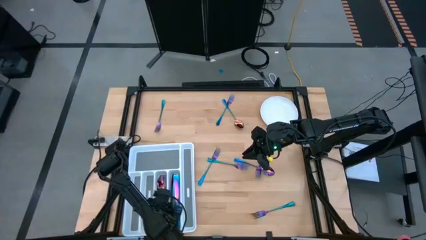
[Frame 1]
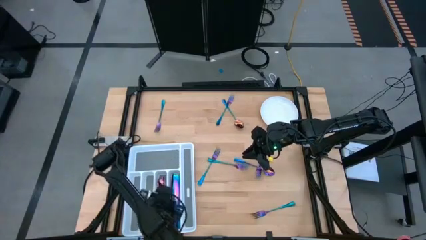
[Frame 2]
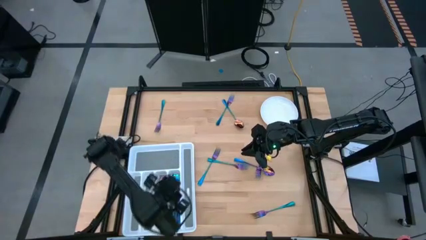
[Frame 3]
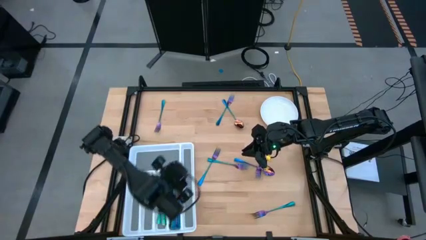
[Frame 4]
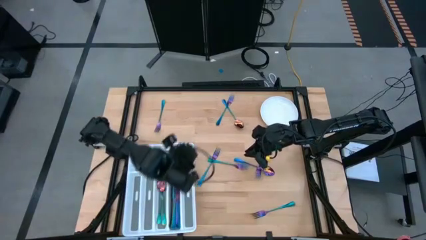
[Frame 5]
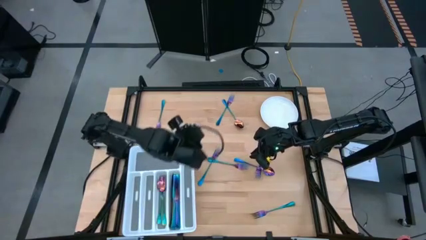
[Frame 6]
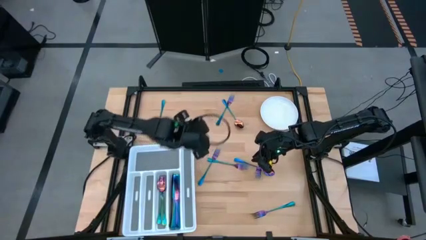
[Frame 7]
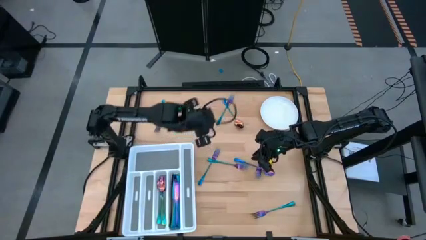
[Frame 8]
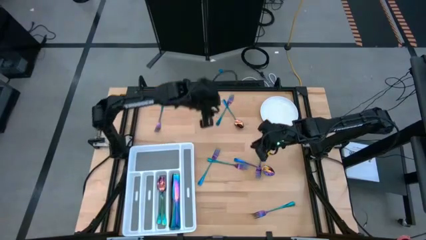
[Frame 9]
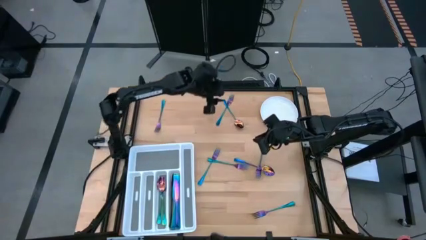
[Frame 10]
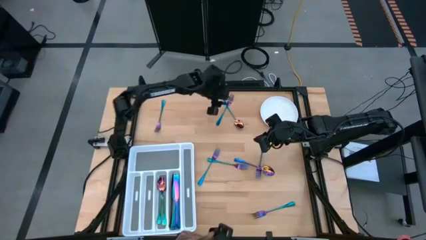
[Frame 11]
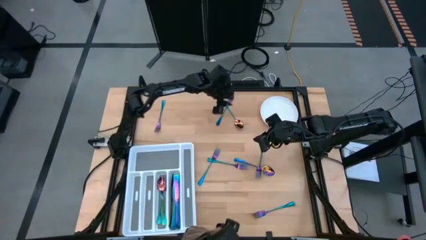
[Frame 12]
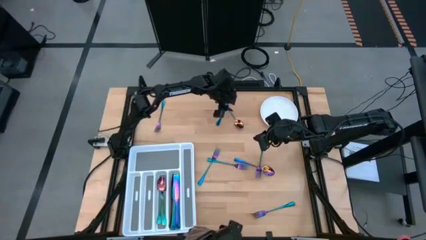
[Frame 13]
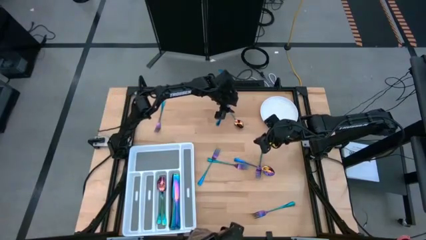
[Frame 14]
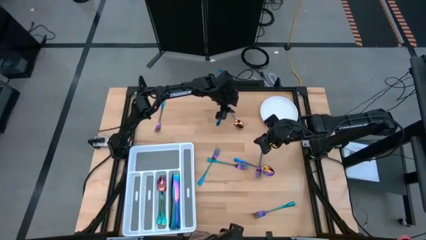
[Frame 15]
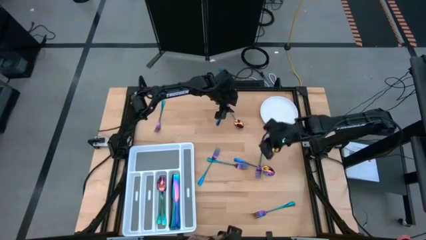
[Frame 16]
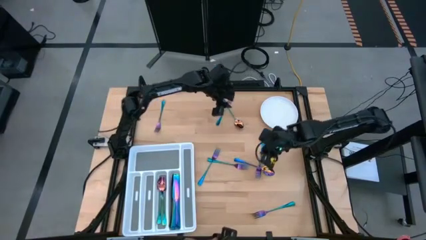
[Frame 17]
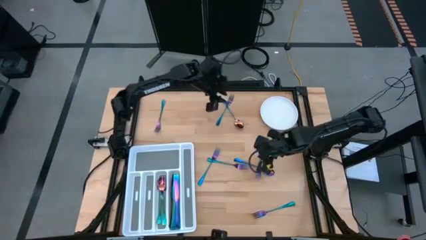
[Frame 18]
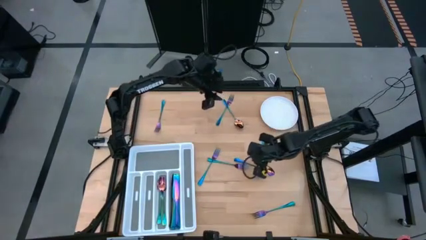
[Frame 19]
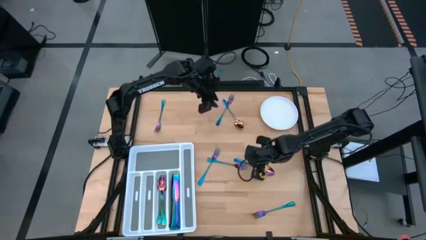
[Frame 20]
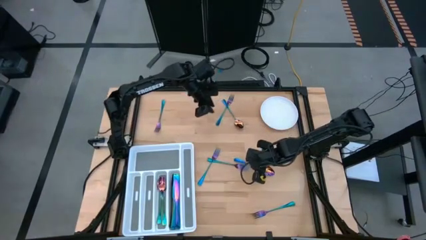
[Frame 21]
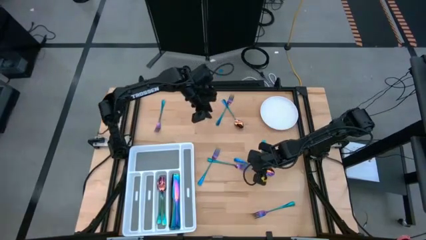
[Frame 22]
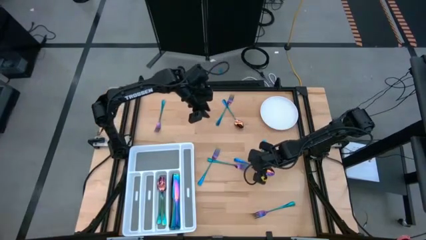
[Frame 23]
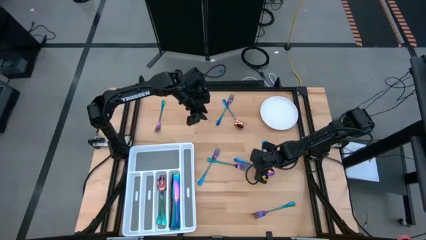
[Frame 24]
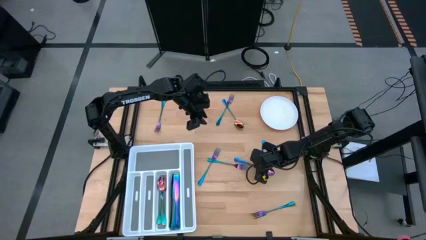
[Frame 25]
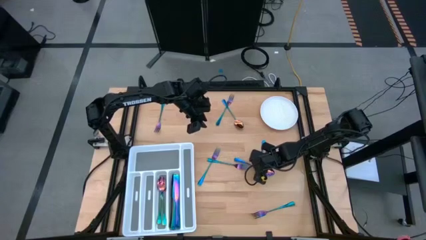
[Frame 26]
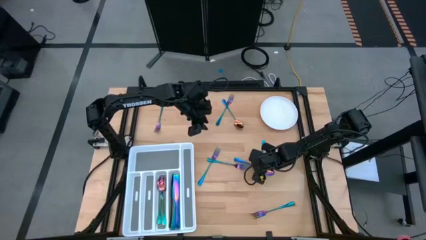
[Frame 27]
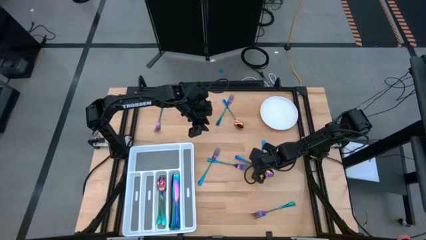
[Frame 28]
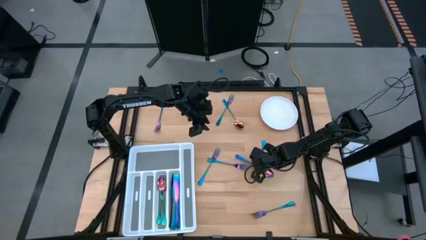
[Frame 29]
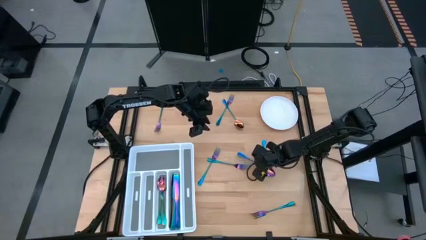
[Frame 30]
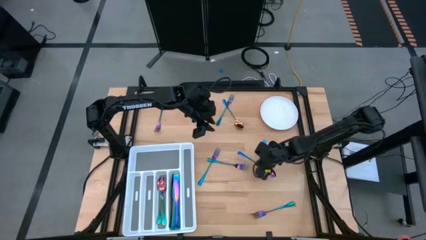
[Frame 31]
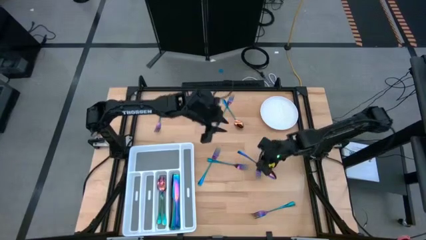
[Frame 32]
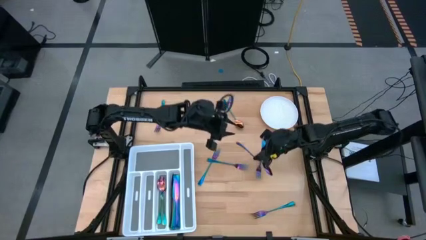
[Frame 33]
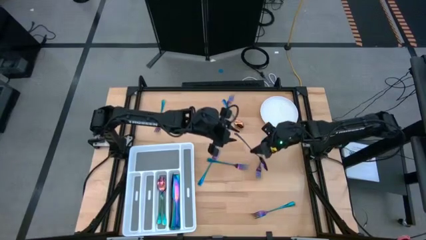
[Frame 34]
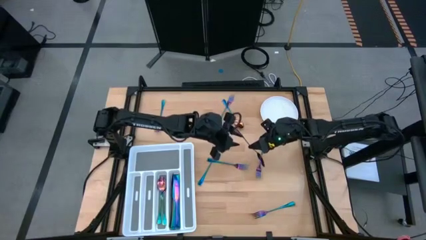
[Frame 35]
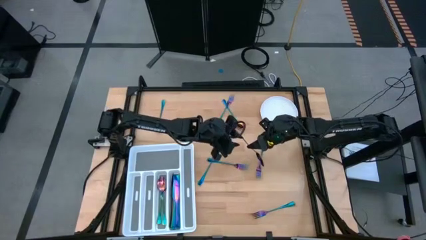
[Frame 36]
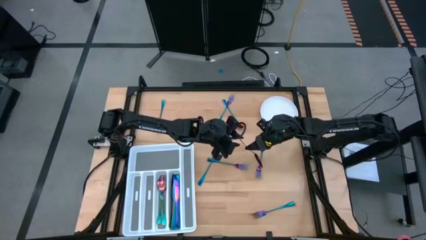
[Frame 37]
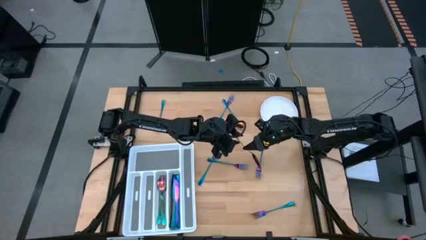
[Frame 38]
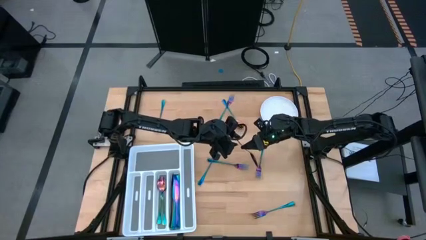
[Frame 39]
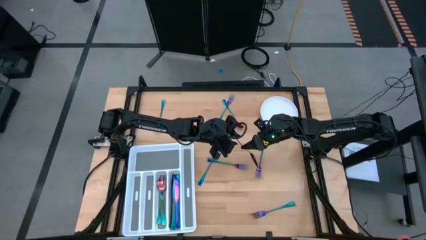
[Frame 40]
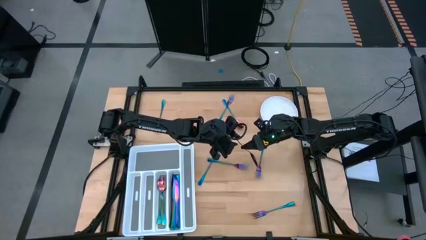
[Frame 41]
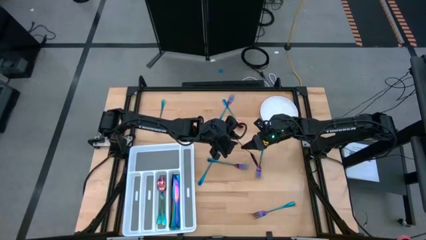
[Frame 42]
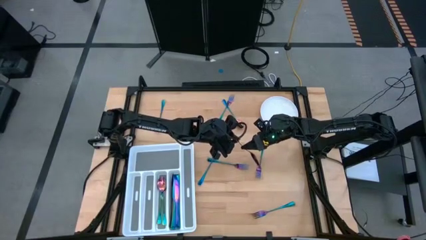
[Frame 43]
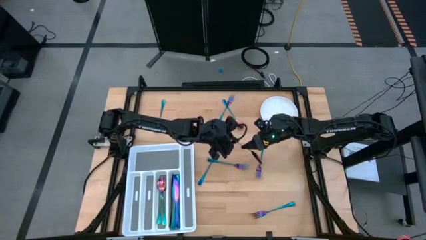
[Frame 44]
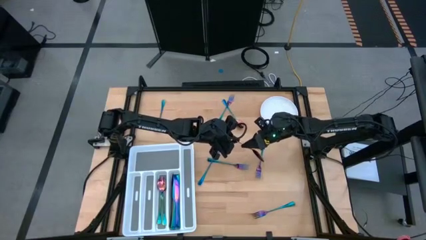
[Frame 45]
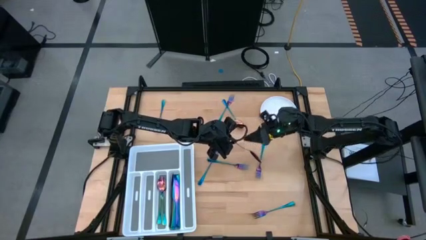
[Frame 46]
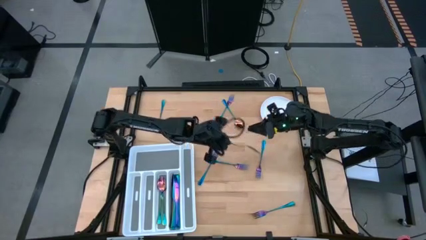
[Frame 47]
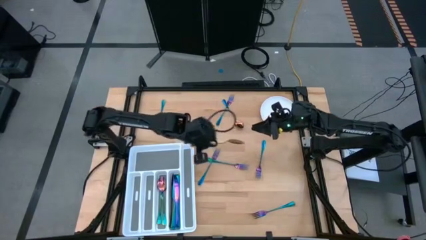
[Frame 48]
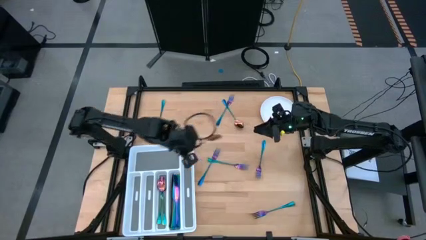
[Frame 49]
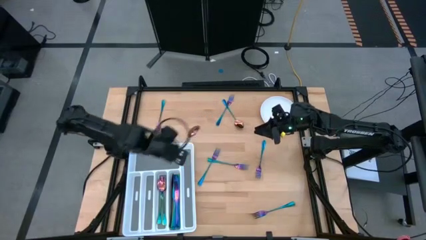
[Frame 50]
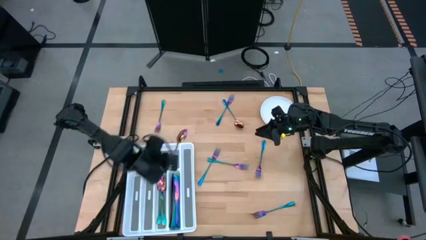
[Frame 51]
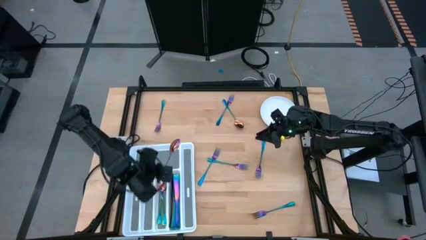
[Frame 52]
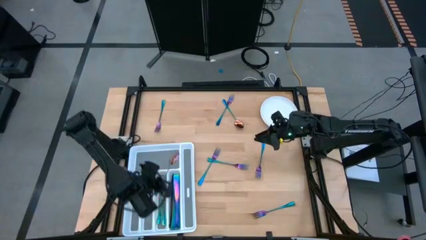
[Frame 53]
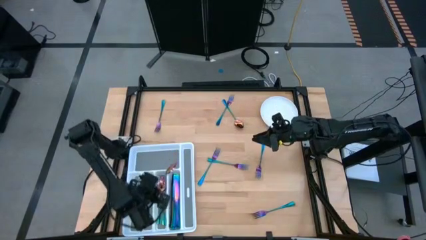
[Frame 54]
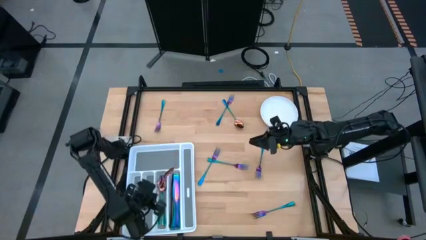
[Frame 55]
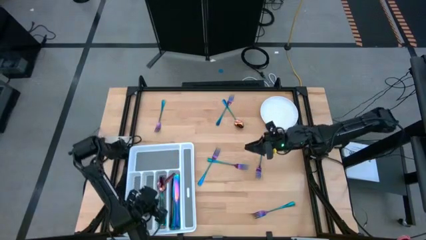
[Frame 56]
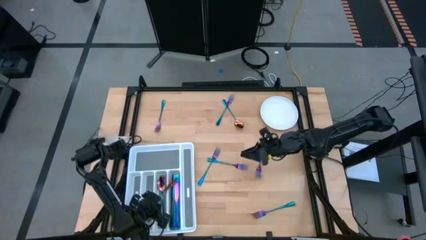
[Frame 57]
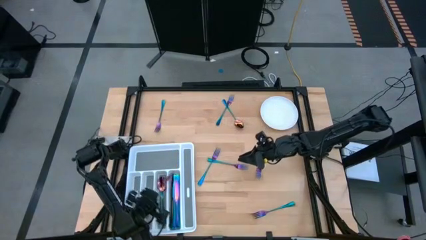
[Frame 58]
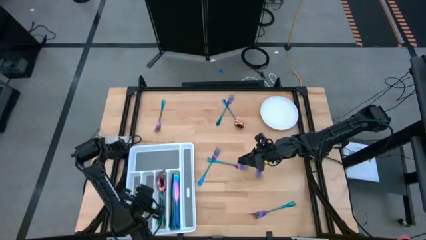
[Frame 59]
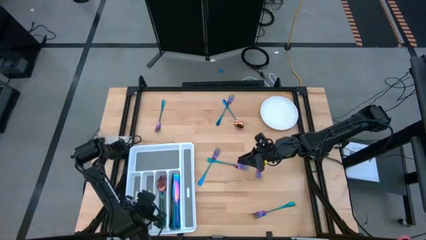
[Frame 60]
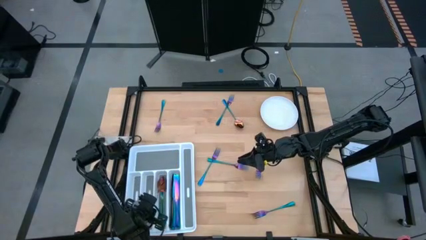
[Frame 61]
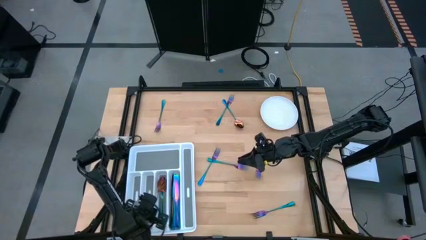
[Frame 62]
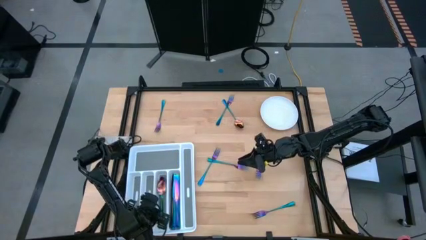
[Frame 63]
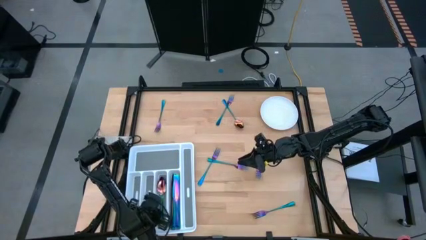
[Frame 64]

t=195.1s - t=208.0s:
Task: Sort silverware
Put the bottom iridescent spoon into the cutlery tray

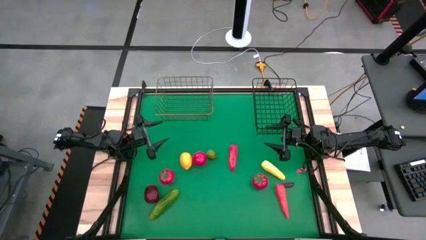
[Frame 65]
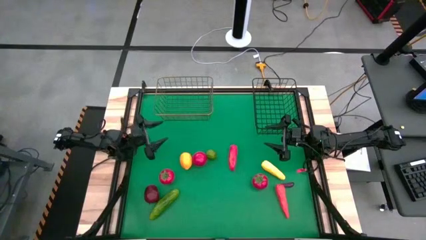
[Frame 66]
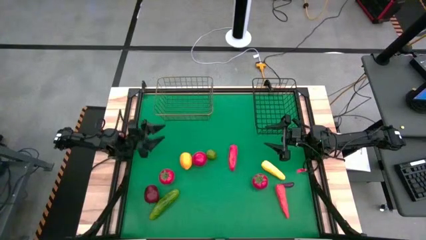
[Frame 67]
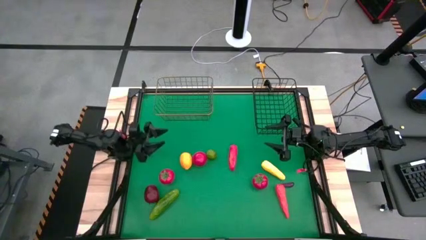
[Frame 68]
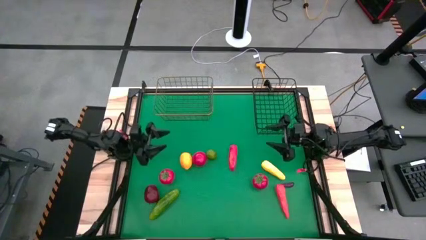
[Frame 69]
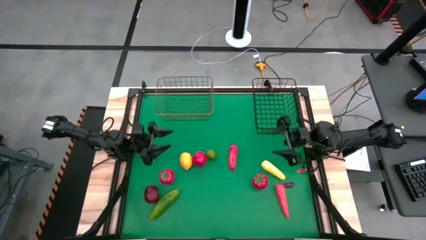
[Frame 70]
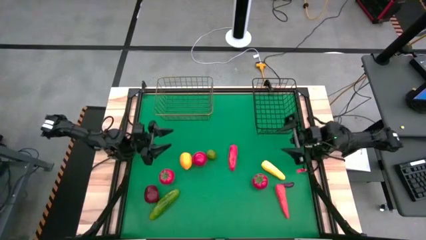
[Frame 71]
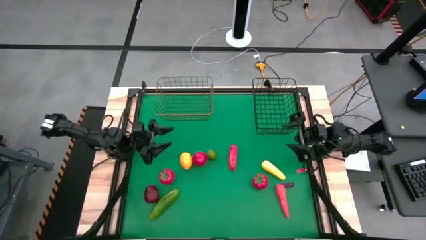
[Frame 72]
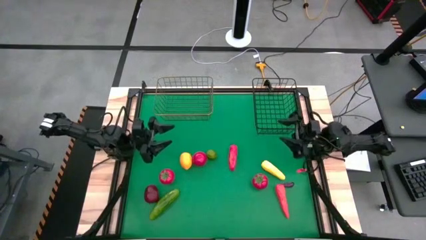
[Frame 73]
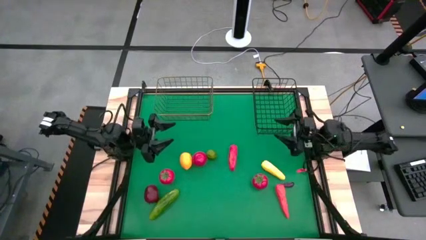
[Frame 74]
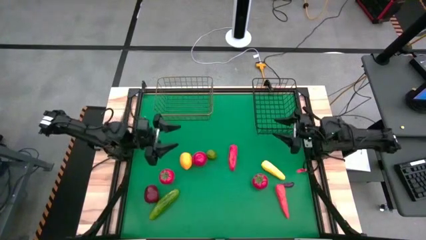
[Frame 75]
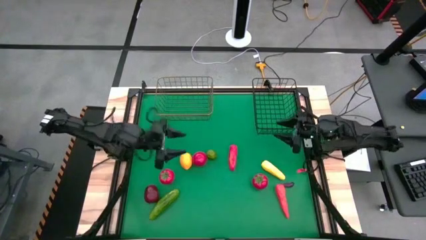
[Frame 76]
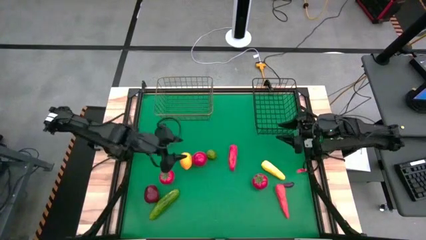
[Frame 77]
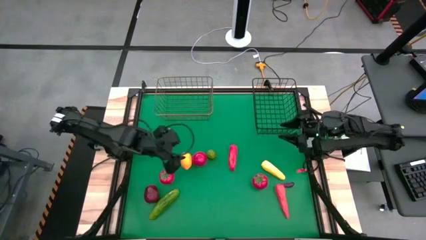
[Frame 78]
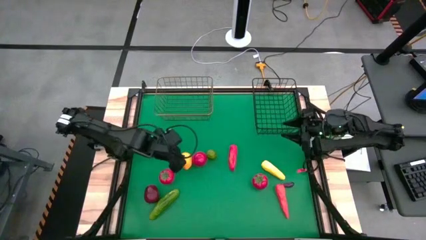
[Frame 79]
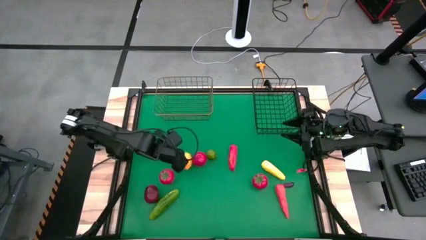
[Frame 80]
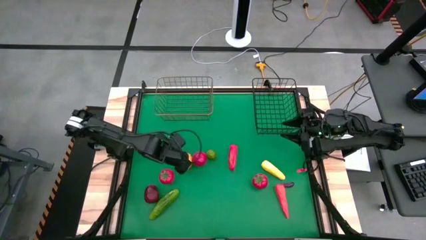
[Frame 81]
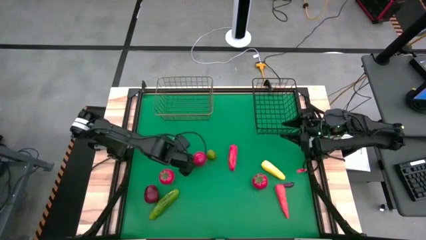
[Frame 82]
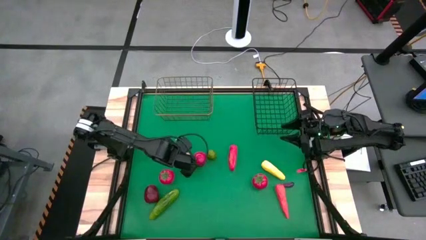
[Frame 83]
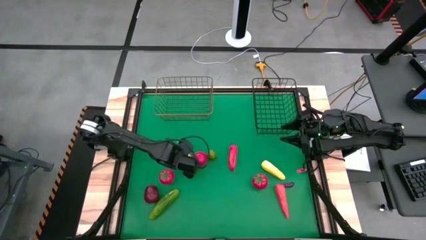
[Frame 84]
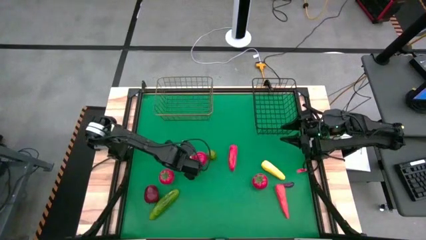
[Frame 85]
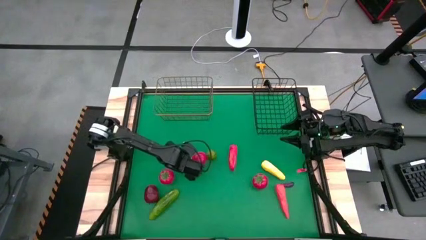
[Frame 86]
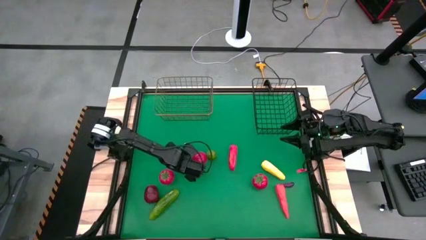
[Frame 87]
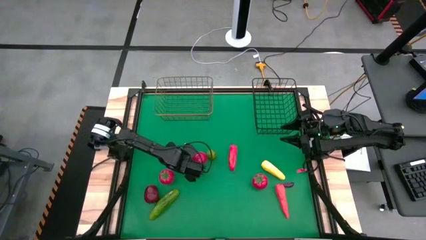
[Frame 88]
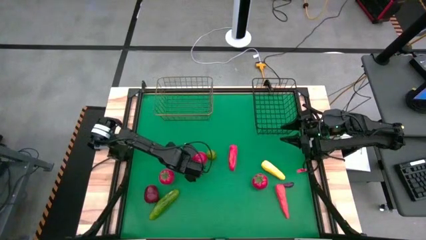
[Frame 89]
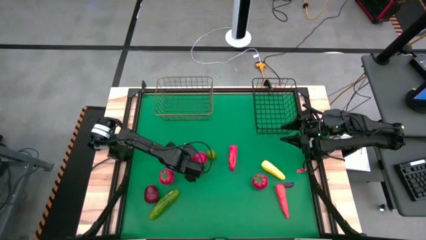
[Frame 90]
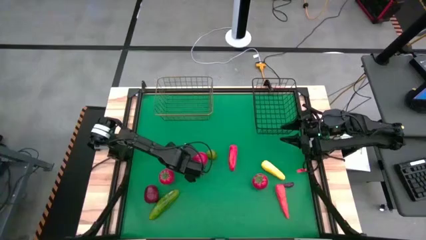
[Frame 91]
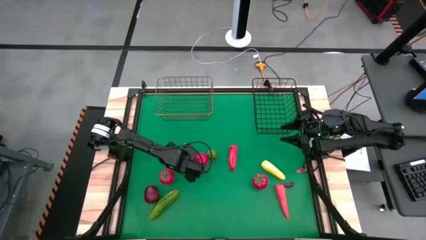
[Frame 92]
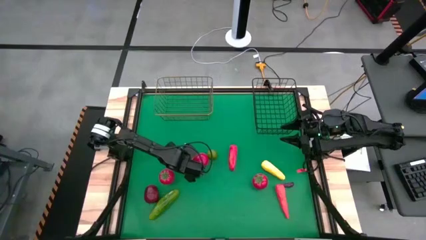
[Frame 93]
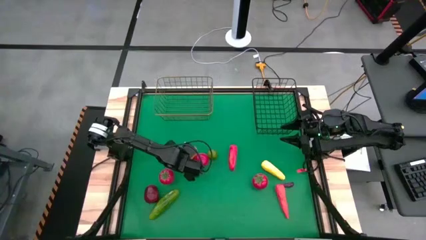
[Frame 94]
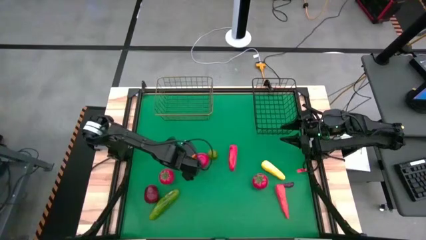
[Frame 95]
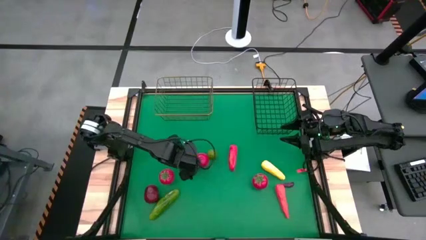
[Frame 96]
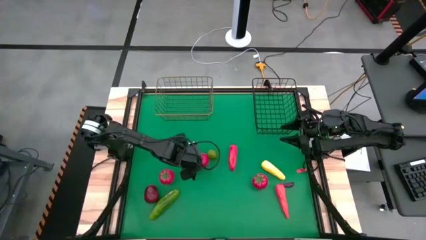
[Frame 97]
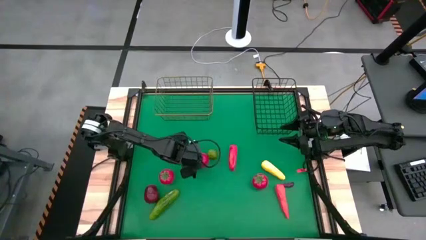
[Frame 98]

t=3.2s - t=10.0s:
Task: Sort produce into baskets
Put the yellow lemon into the black wire basket
